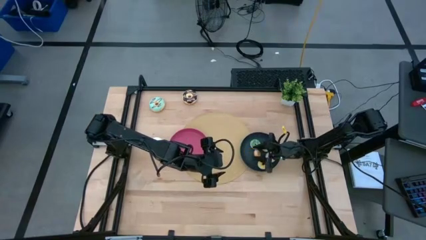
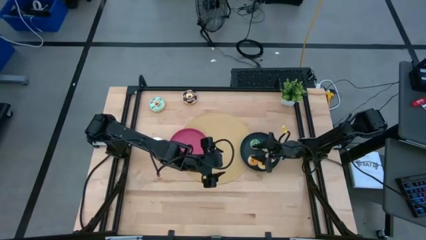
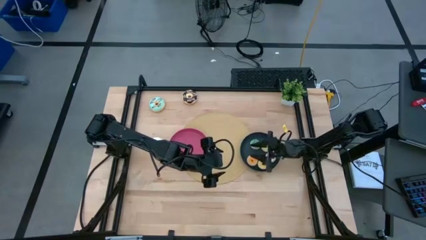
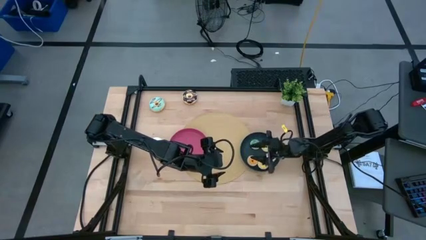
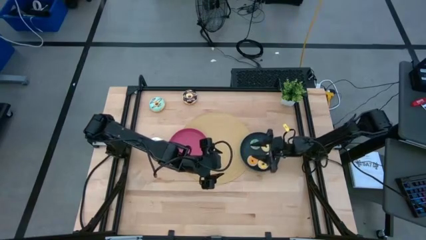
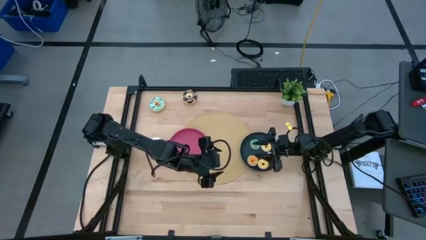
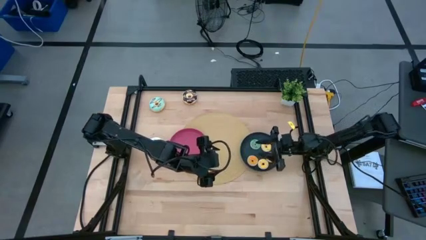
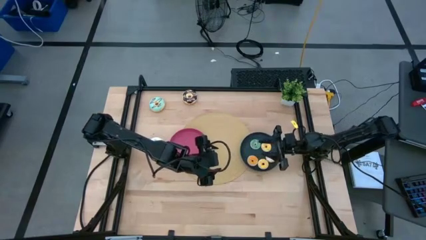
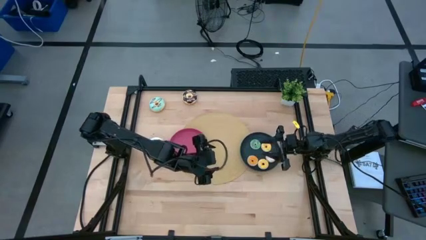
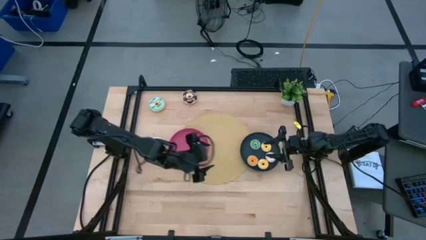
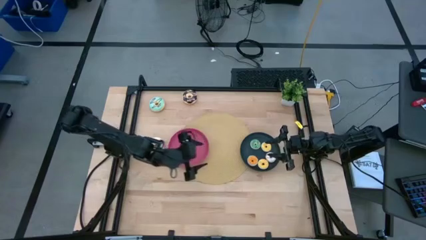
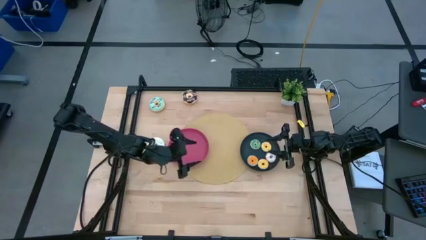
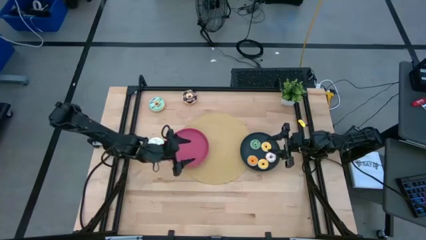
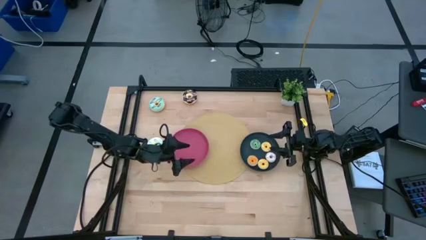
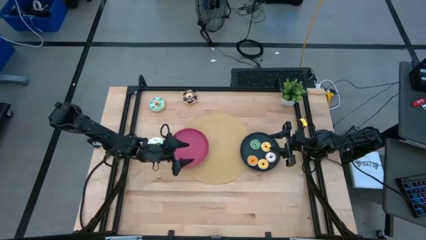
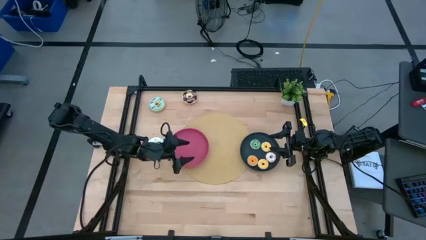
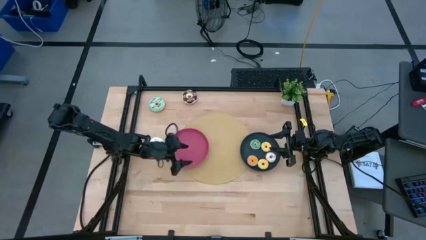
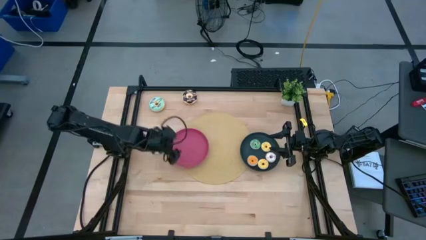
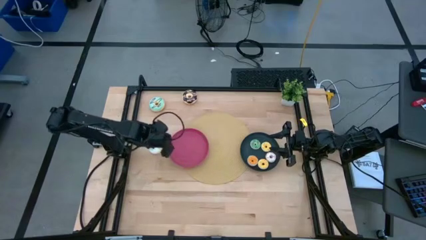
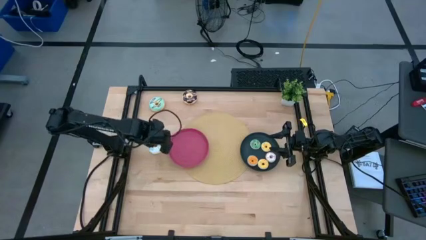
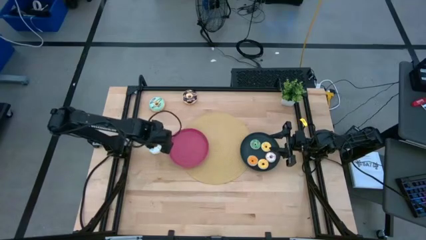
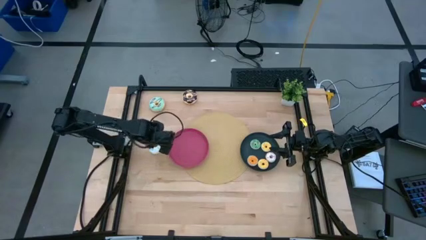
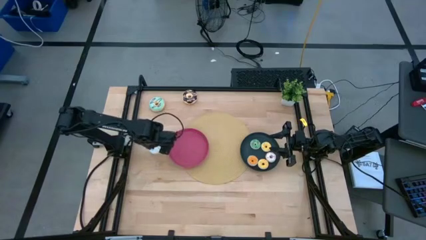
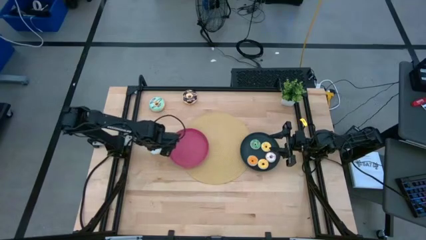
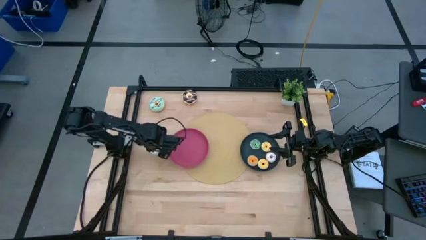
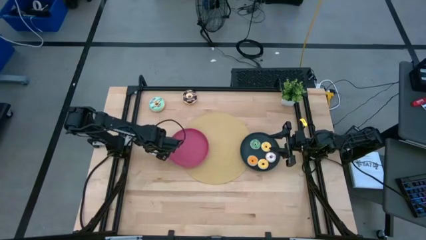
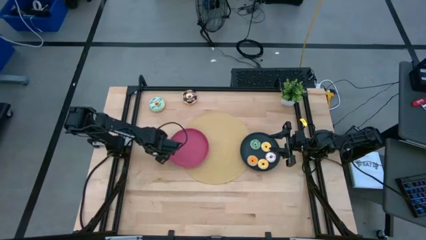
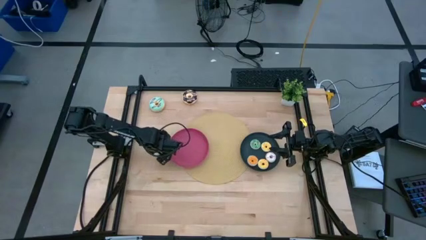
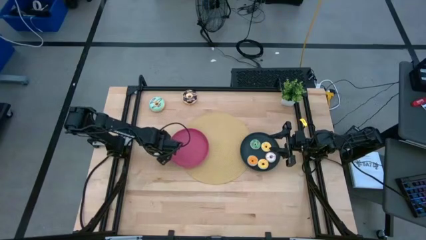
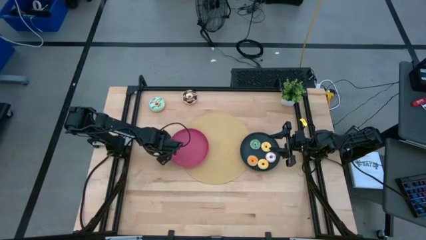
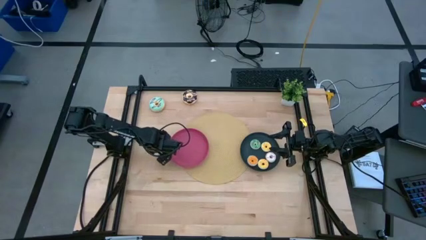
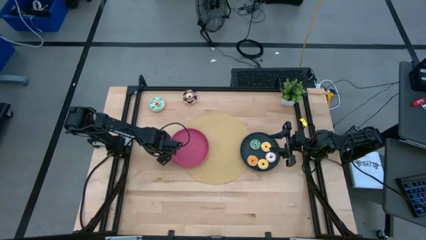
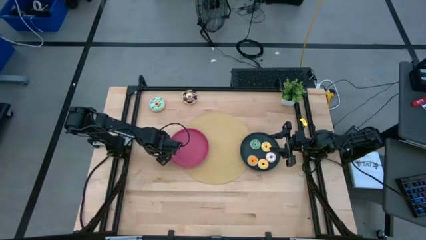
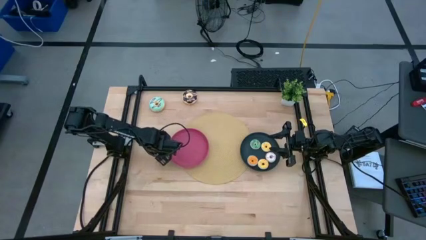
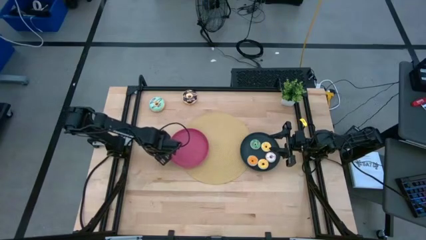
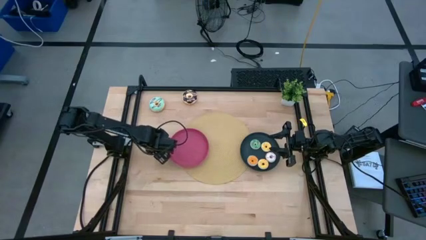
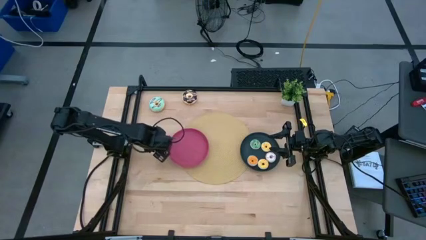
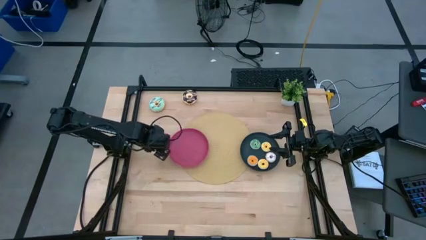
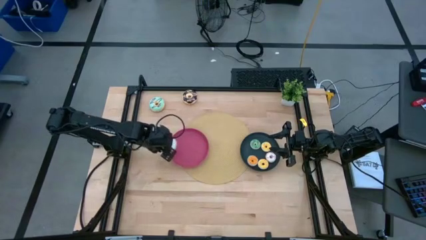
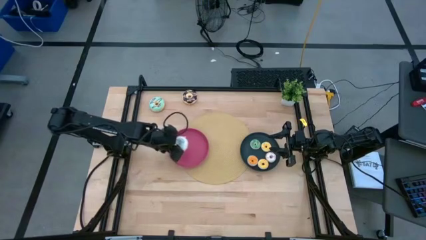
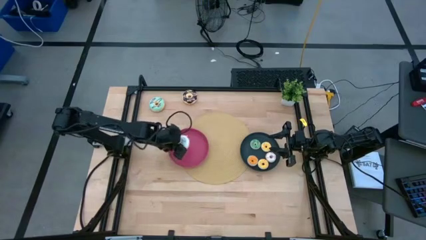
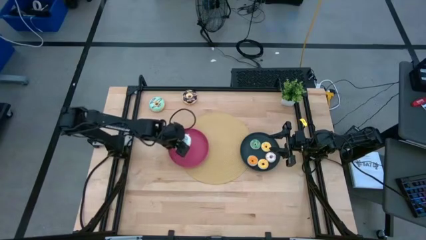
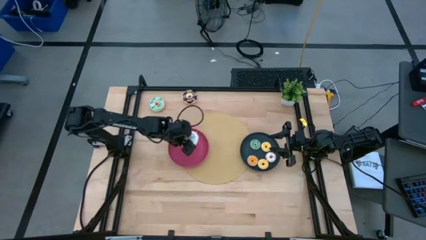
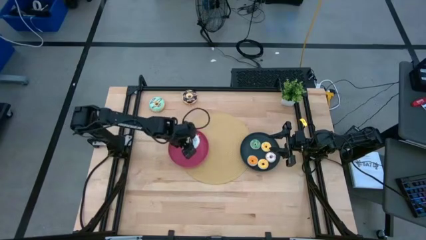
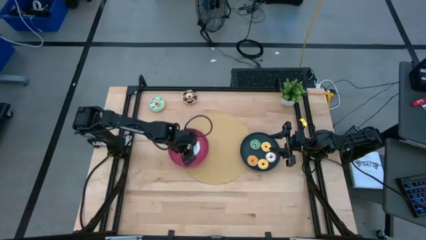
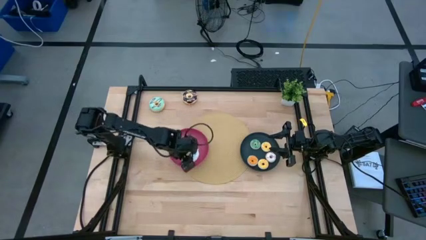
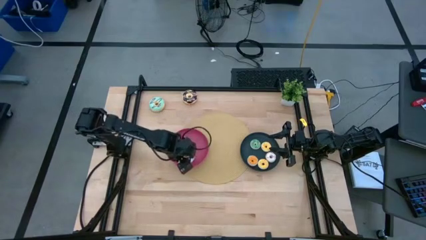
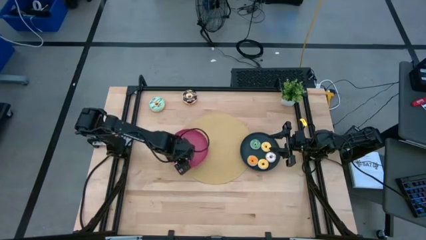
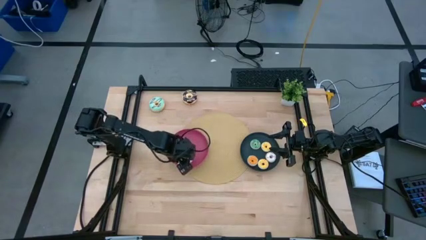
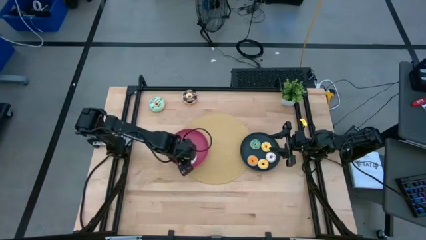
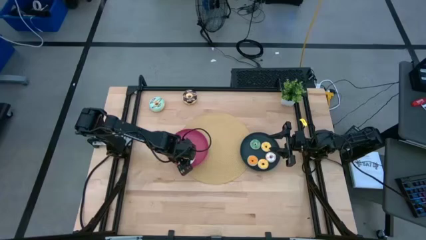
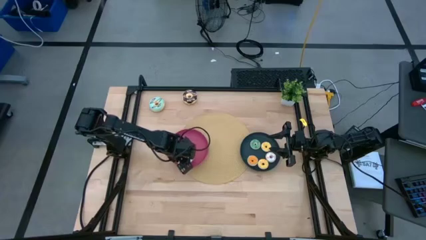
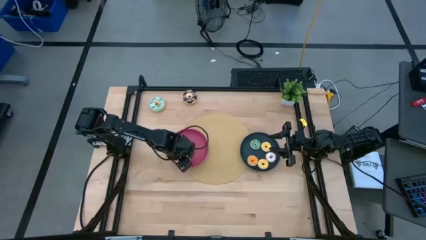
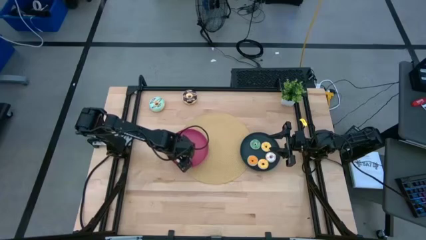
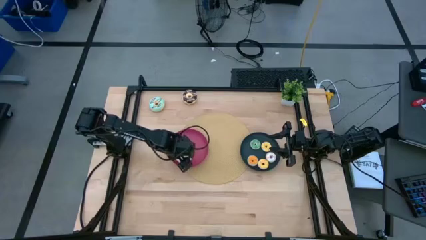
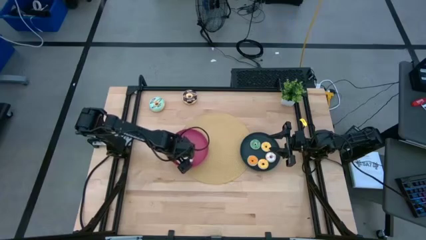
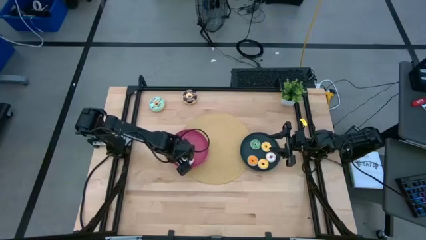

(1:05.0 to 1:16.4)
Task: Pick & Place donuts
Put the large white donut on the pink plate

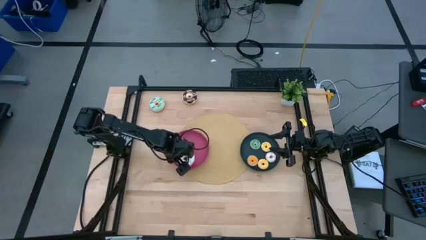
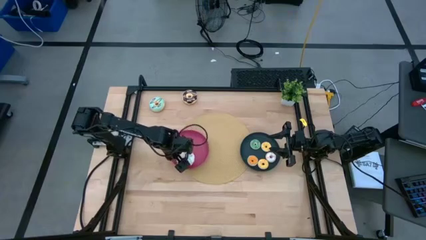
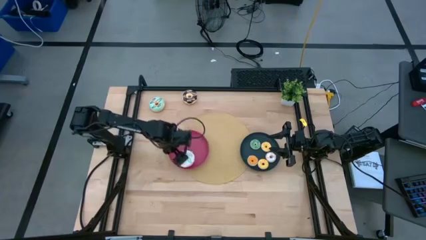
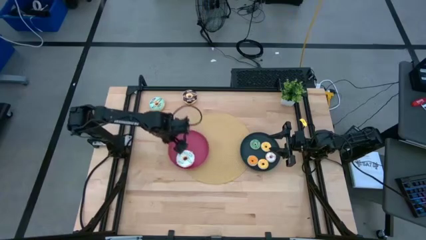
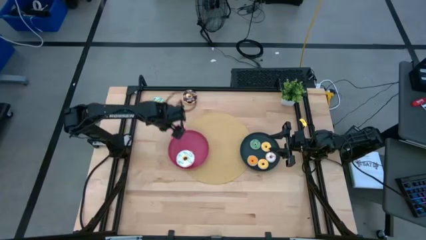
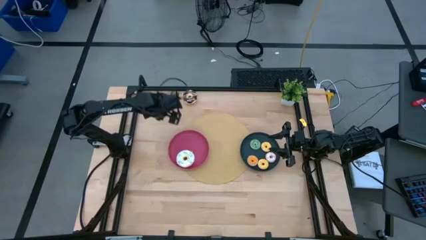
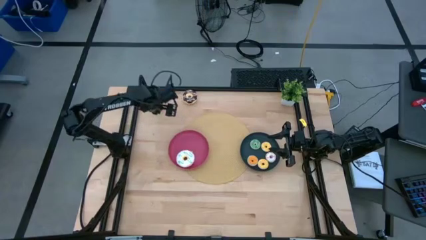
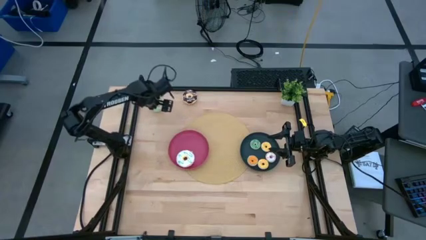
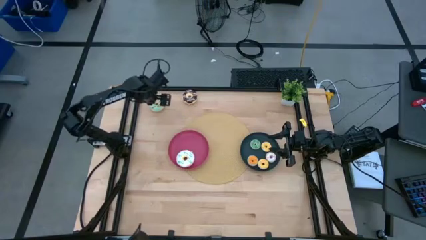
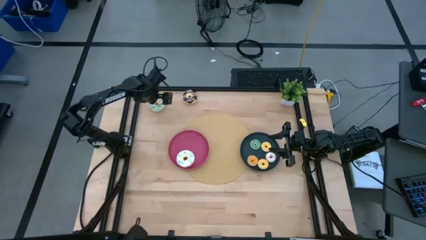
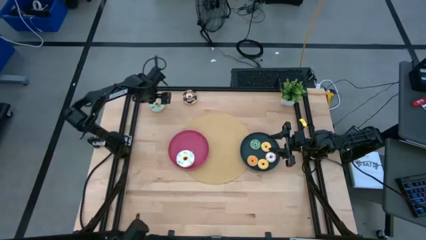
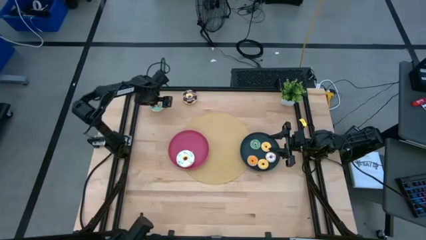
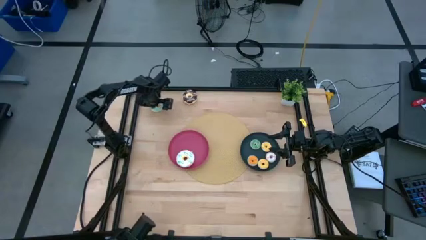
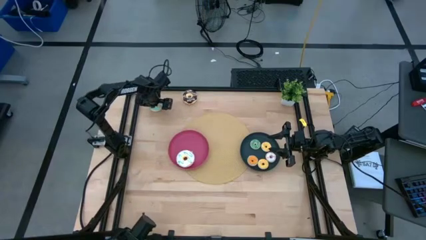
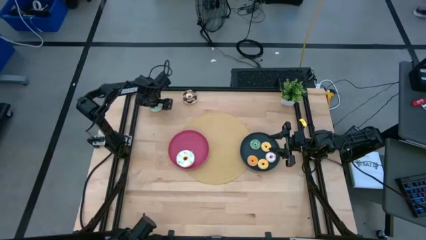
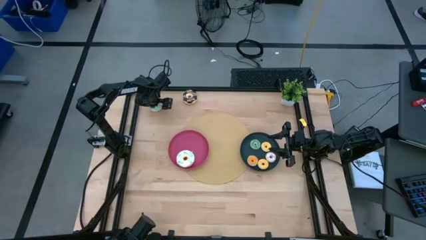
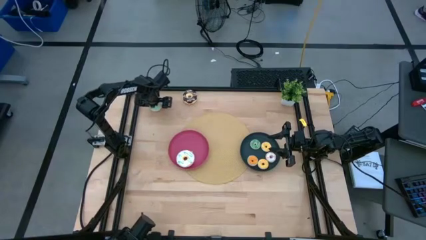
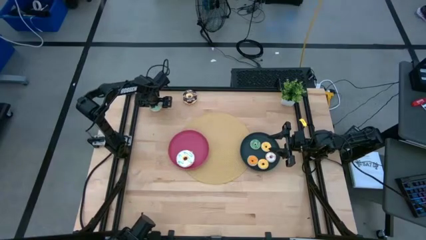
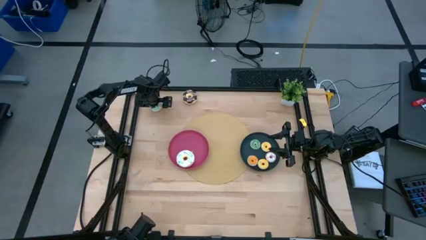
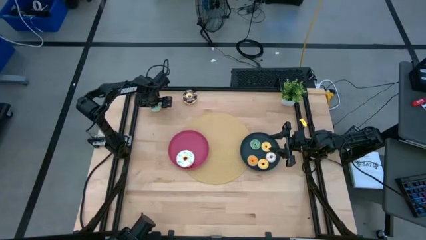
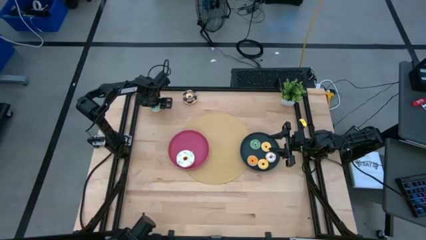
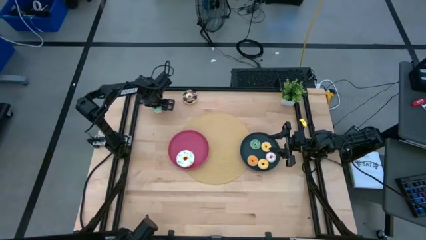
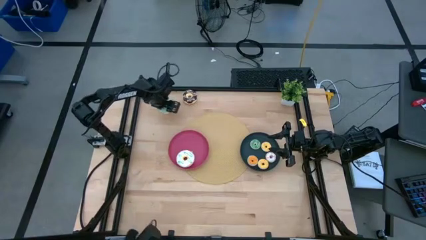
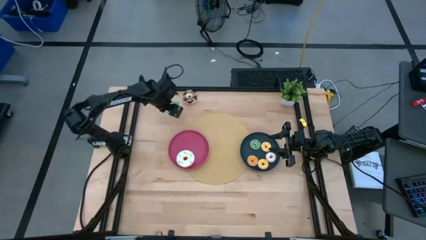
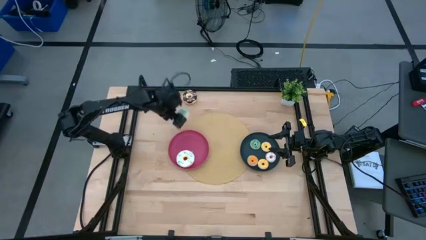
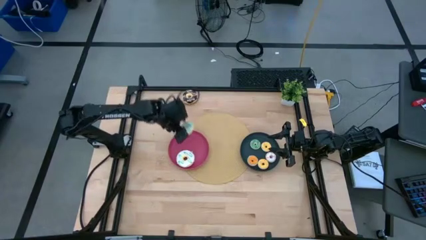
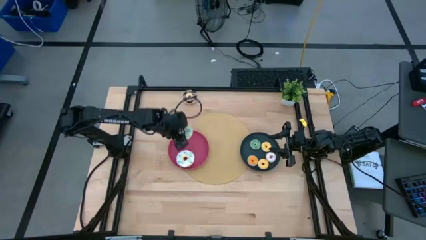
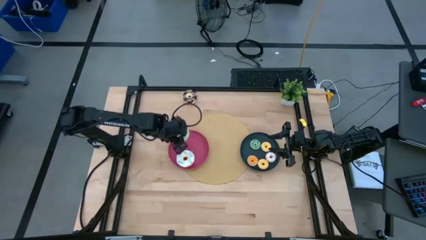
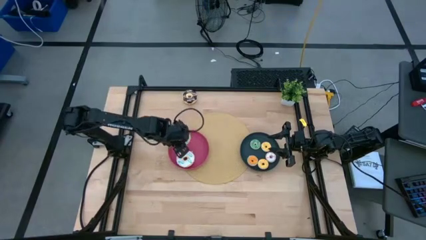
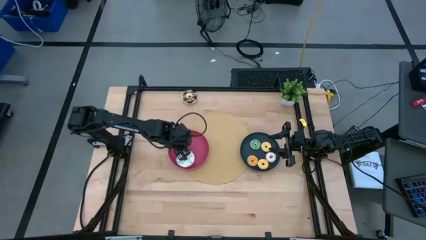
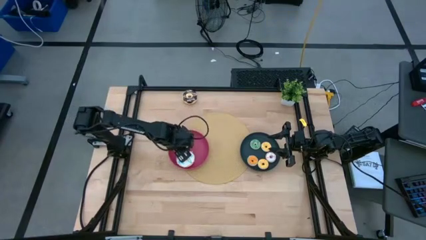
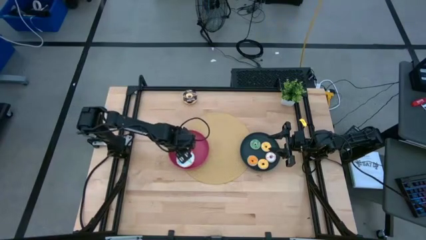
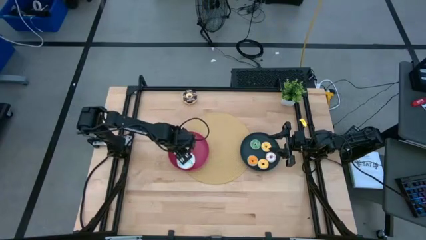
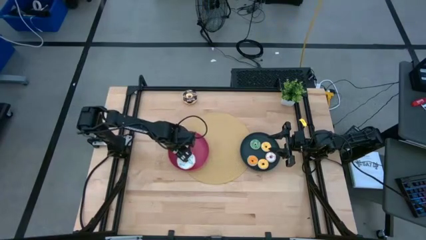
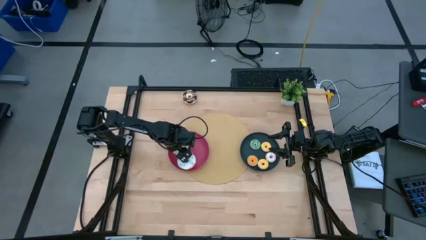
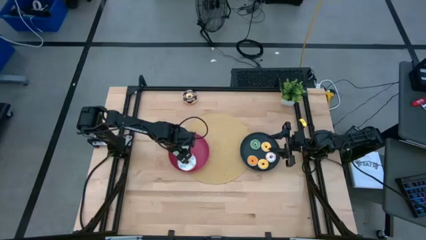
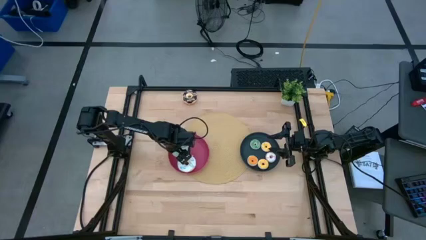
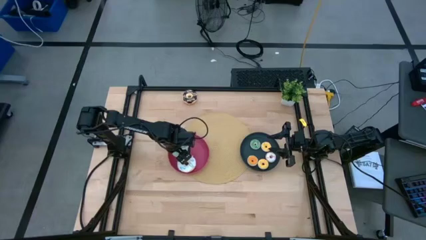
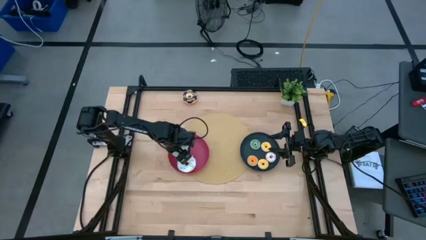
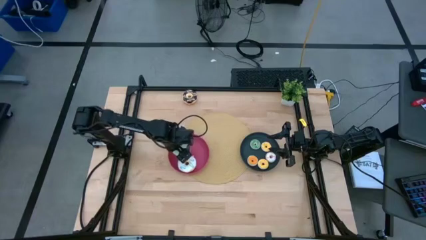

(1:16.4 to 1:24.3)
Put the large green donut on the pink plate
